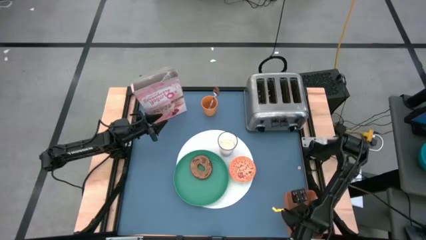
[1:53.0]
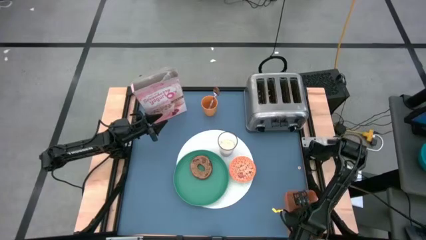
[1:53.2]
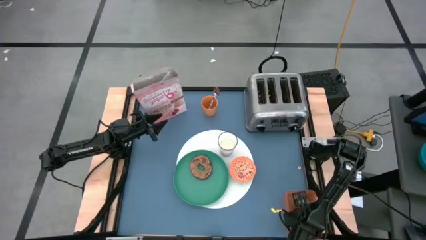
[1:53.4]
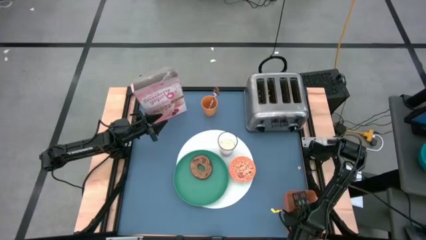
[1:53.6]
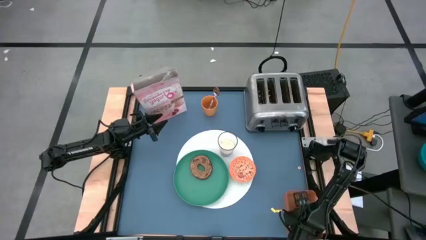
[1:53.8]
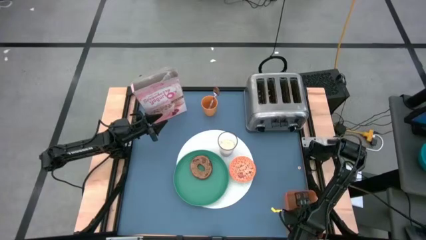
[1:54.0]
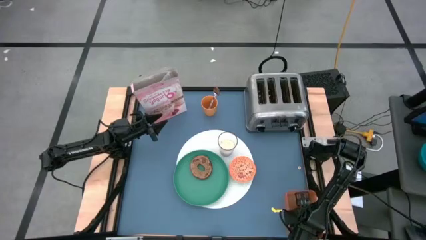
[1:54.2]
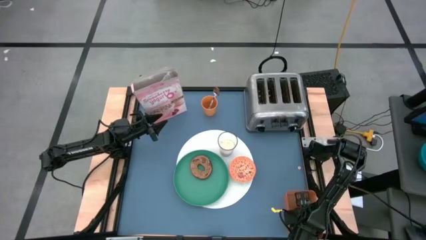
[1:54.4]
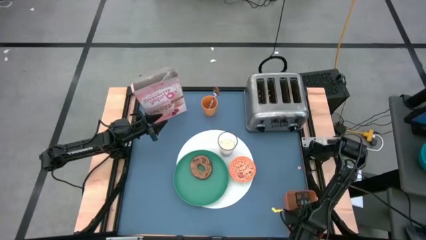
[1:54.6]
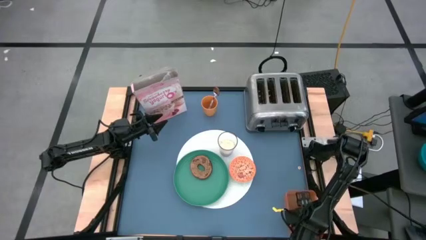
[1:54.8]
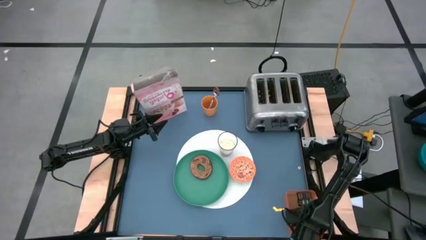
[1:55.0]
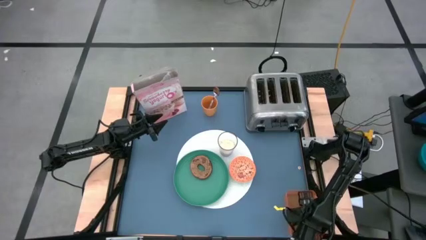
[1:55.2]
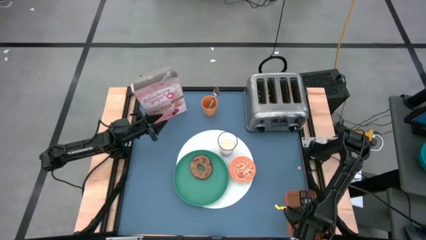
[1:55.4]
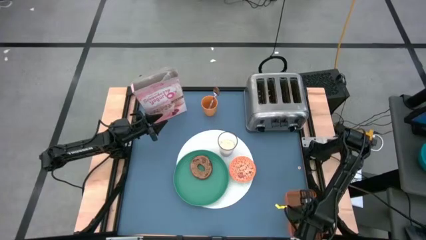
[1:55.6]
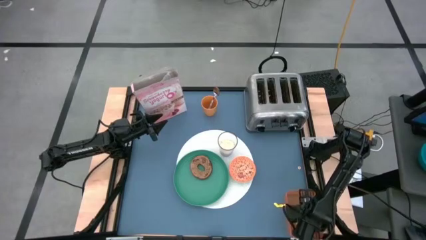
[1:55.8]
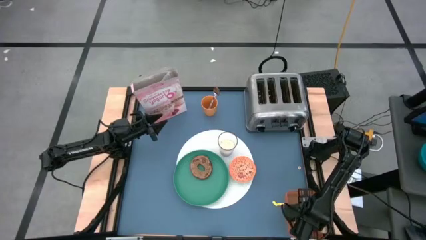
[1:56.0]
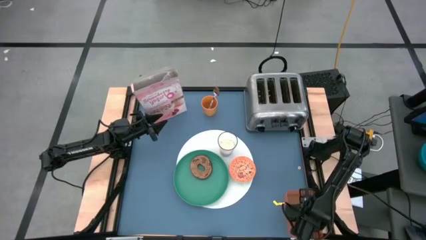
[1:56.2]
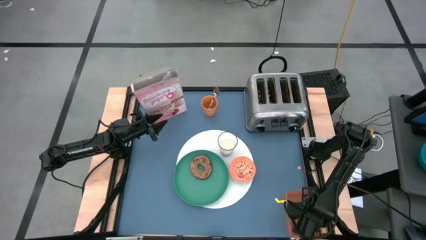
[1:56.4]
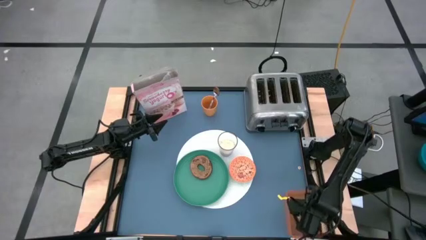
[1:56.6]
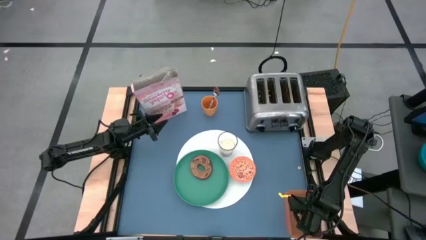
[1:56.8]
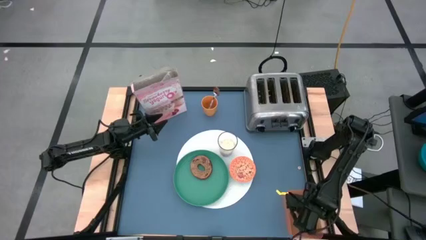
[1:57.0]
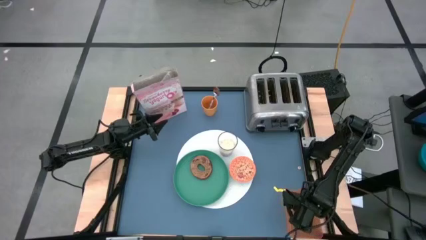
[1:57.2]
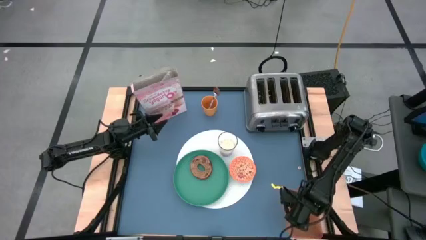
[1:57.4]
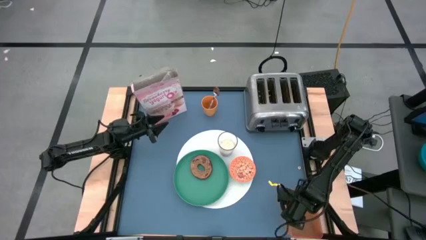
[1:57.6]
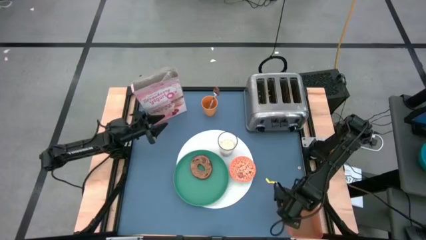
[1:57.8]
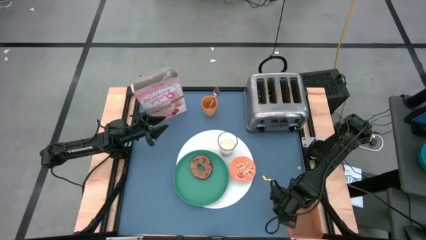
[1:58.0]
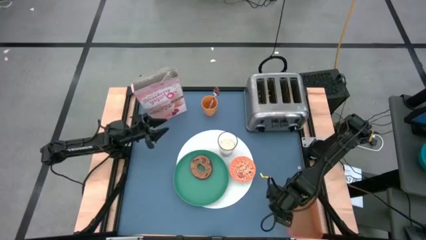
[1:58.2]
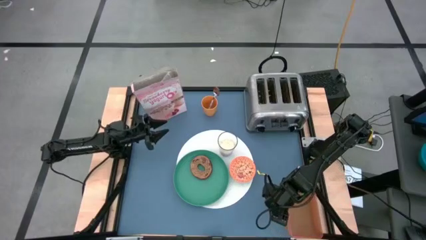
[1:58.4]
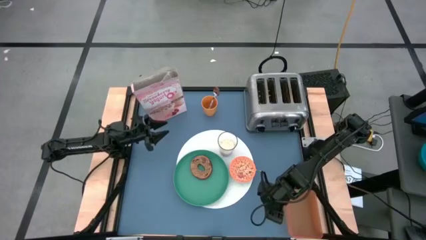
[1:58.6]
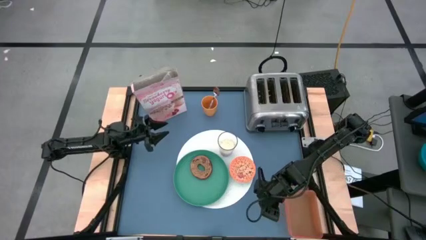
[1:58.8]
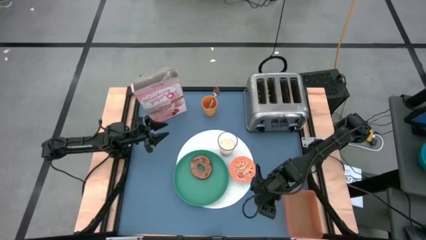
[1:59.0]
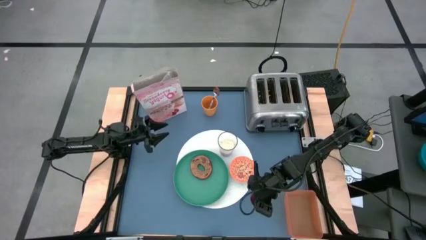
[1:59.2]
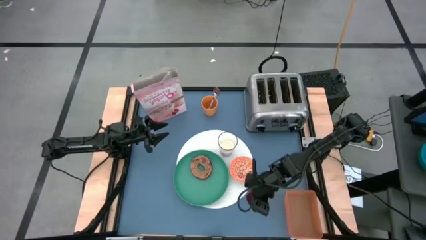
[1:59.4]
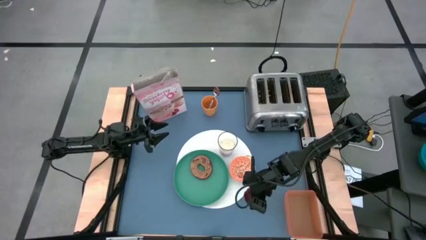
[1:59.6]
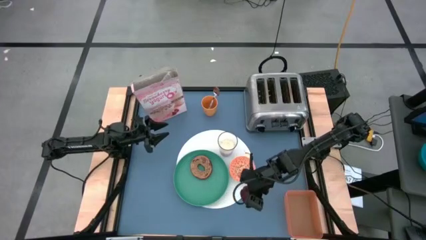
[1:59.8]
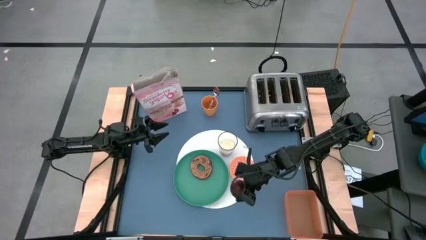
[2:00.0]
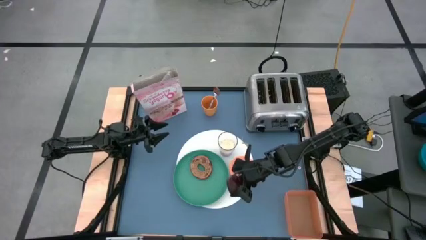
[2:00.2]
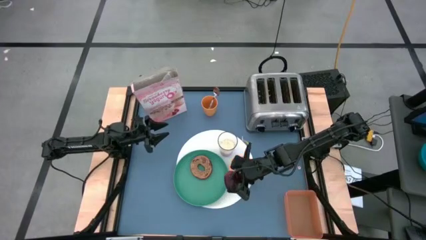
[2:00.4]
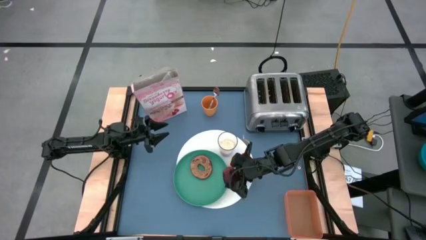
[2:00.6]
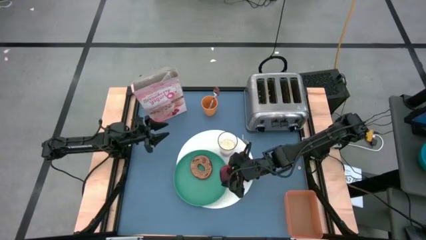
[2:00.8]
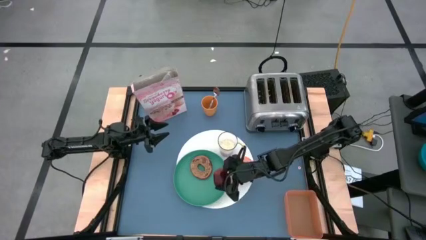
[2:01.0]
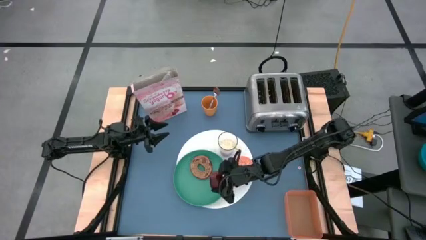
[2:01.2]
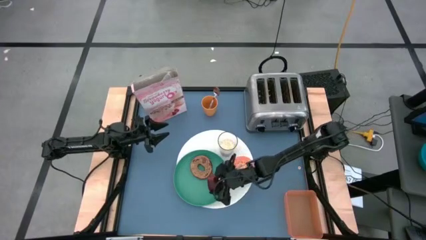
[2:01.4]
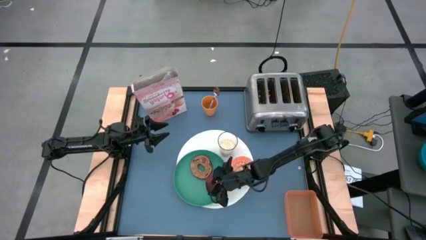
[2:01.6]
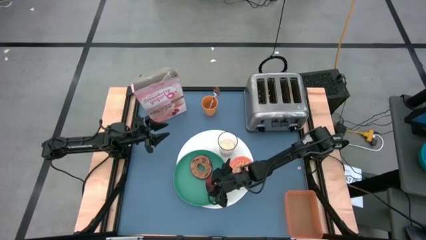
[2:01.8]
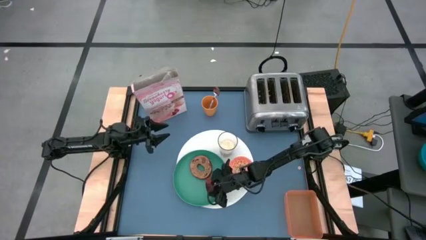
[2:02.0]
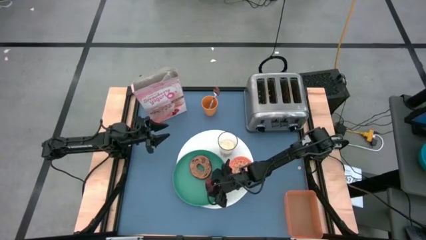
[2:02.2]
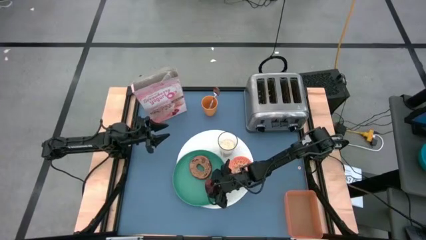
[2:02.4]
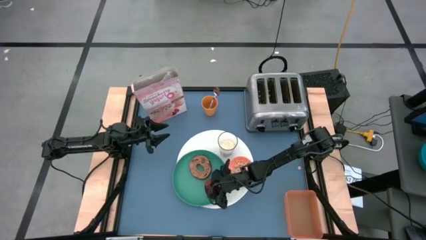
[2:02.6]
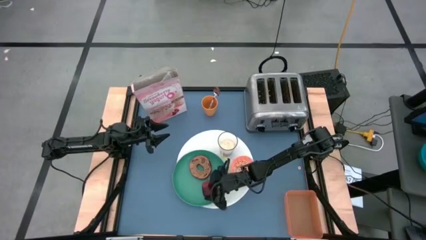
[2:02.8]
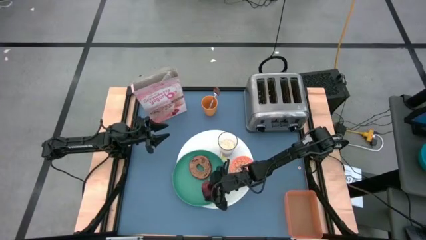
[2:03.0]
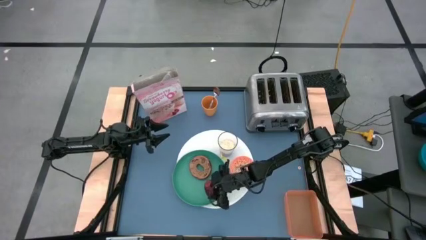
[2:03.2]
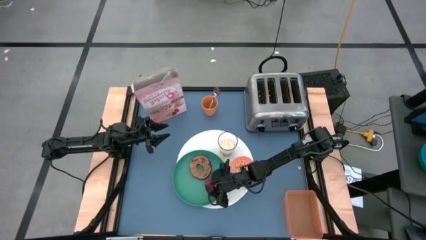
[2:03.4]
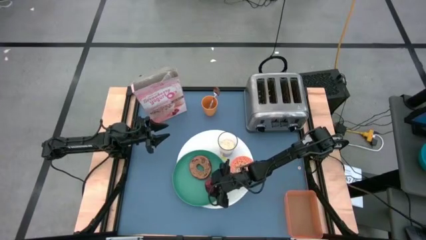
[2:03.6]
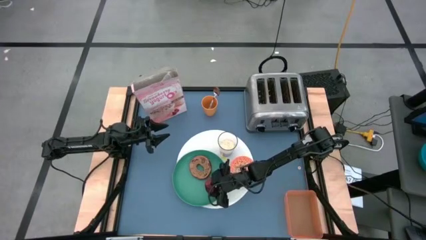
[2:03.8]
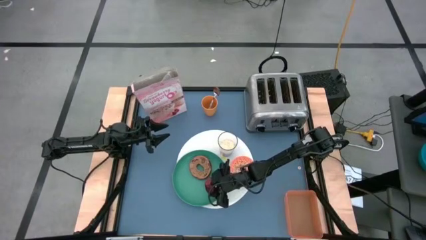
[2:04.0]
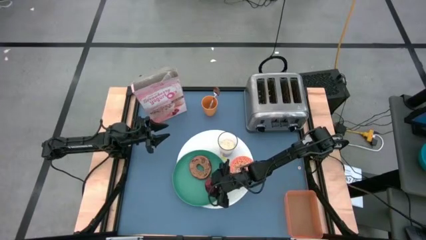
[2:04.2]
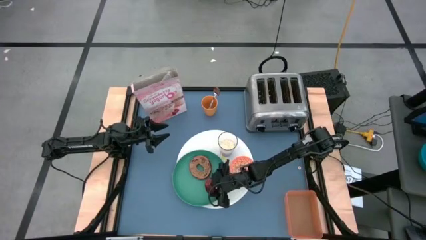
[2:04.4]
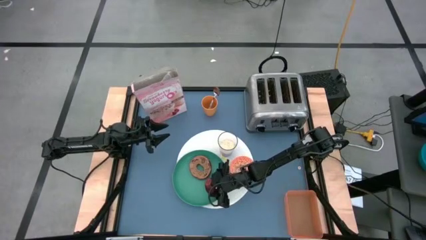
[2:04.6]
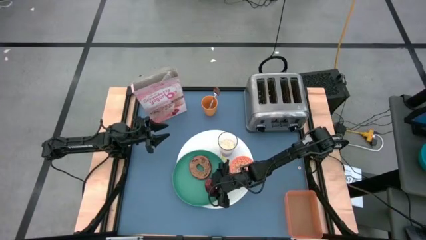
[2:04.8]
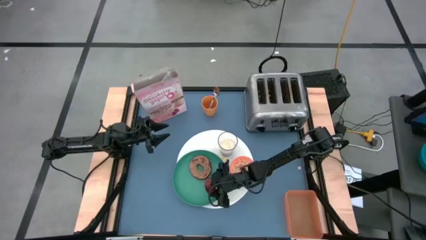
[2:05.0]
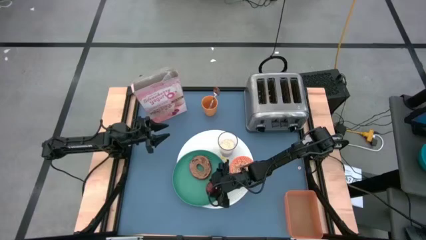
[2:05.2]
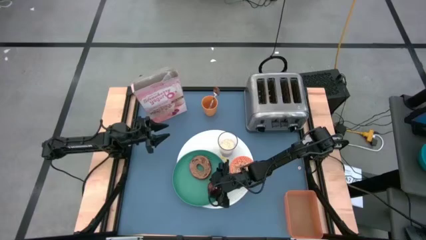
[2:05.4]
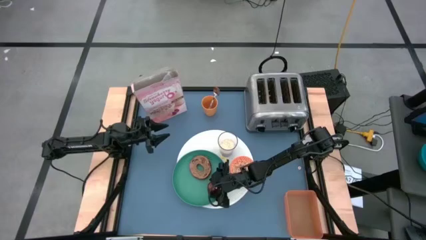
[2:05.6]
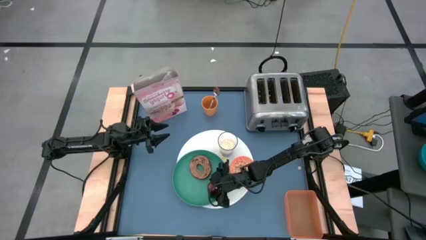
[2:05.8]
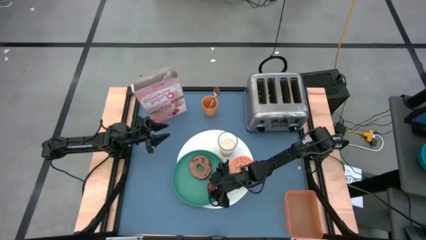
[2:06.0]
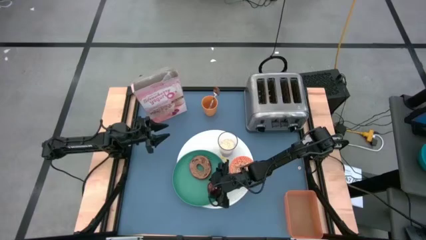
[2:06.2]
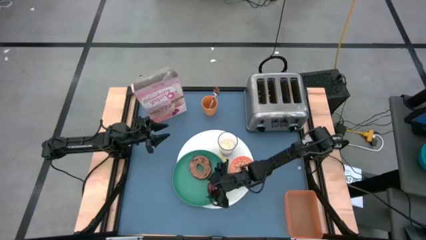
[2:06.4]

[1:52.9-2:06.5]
Task: Arrange a breakfast setting
Put the red apple into the green plate
